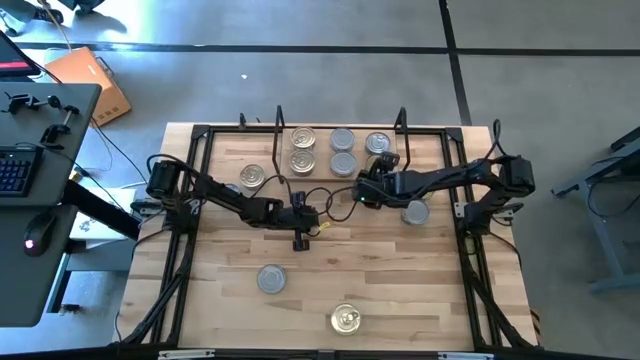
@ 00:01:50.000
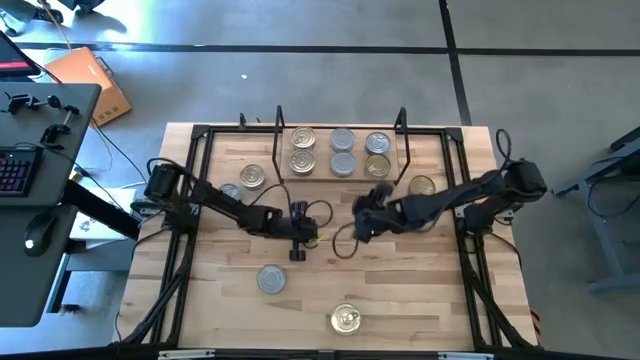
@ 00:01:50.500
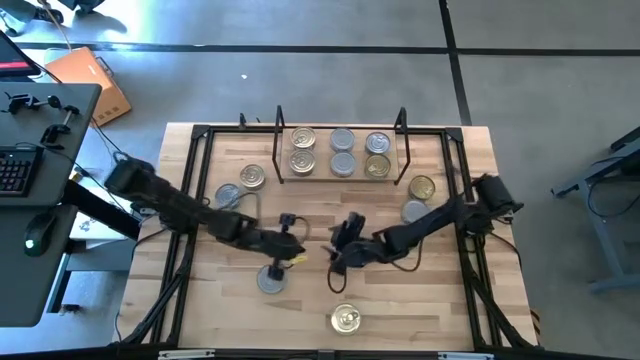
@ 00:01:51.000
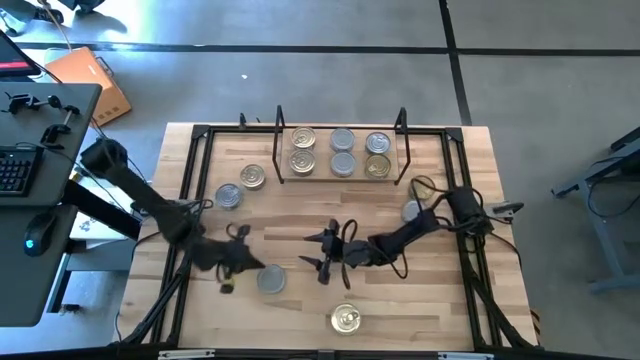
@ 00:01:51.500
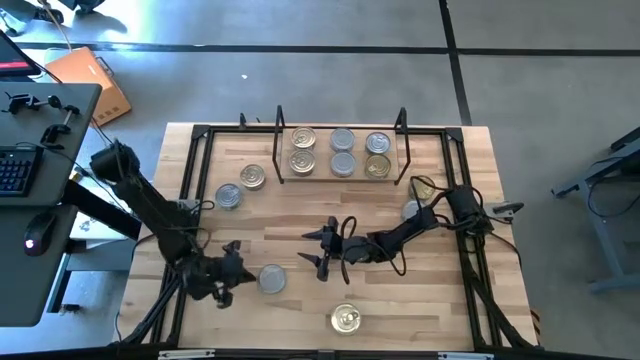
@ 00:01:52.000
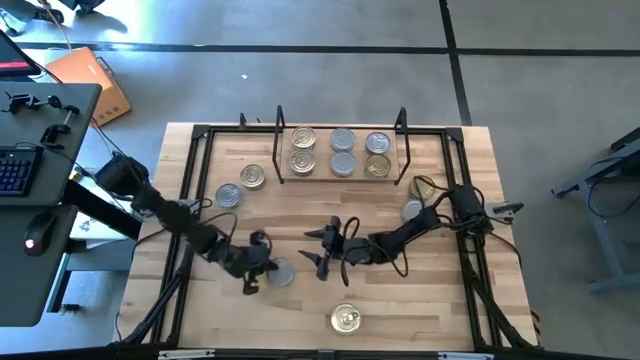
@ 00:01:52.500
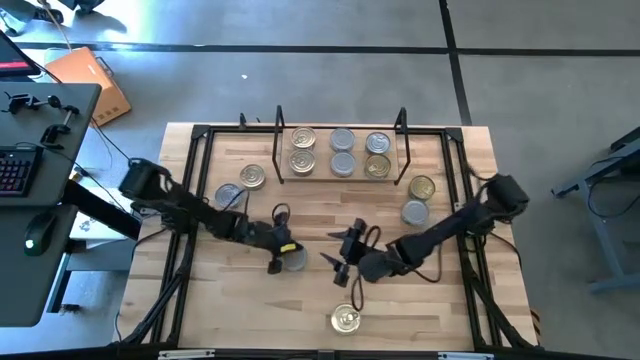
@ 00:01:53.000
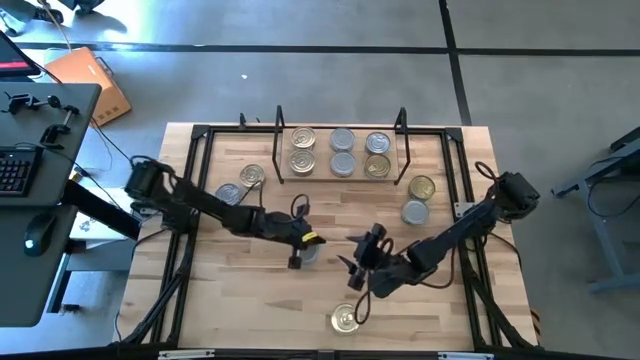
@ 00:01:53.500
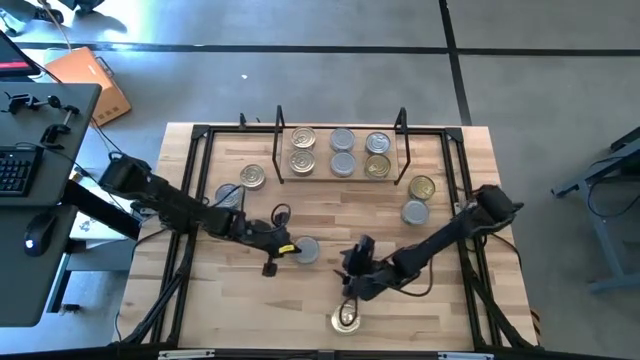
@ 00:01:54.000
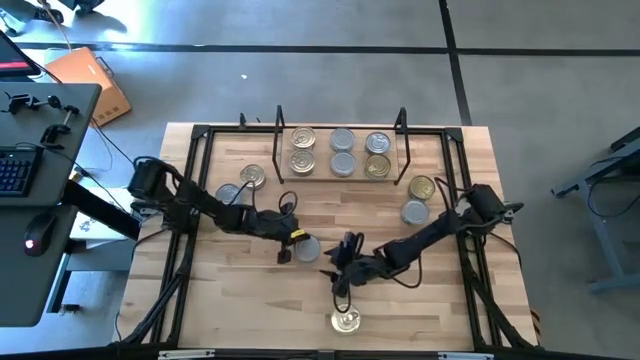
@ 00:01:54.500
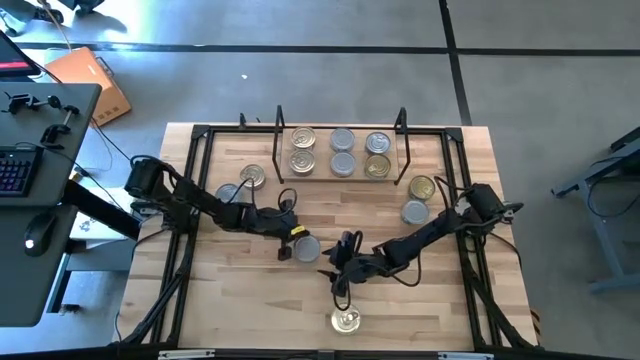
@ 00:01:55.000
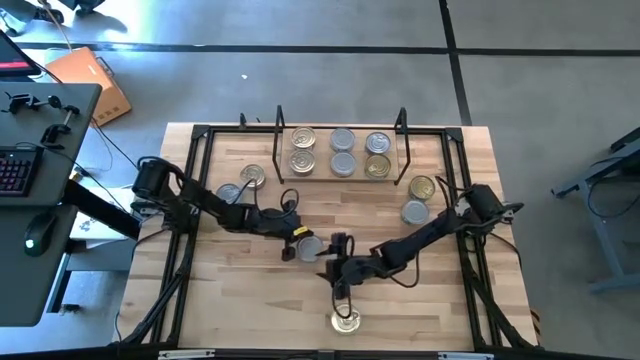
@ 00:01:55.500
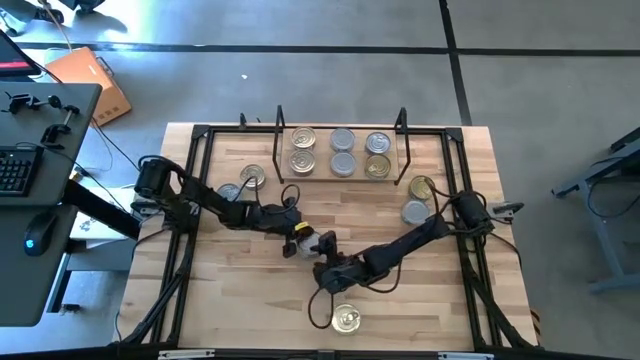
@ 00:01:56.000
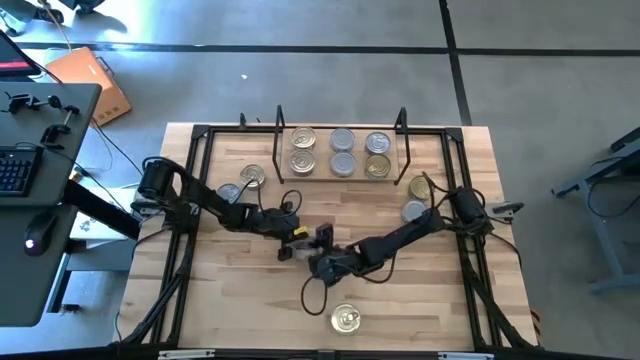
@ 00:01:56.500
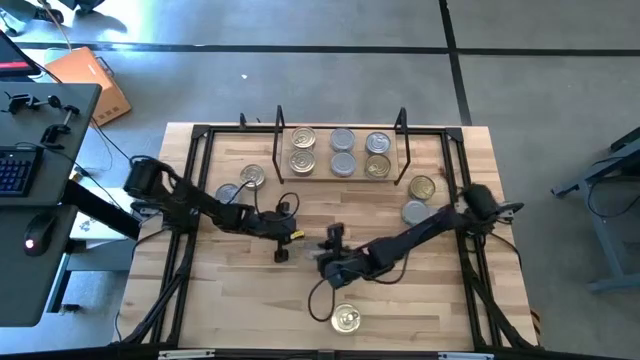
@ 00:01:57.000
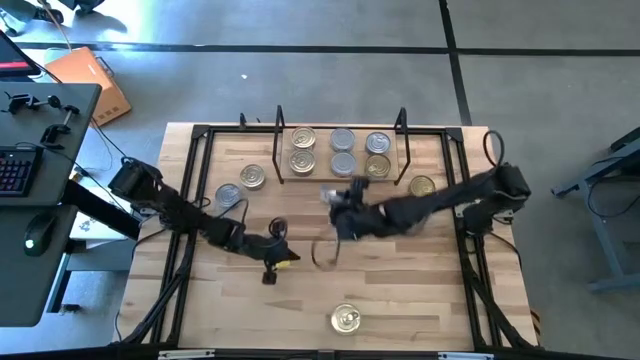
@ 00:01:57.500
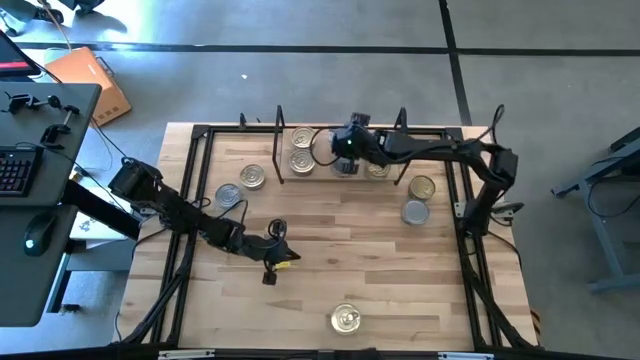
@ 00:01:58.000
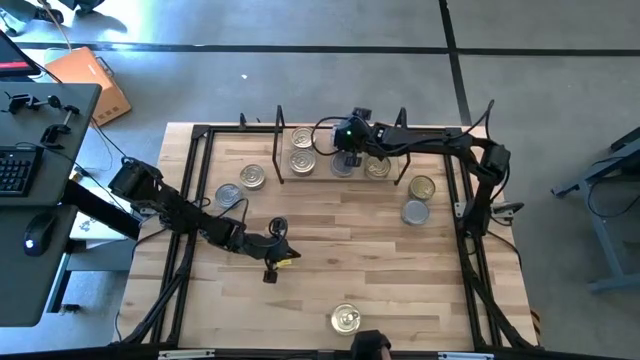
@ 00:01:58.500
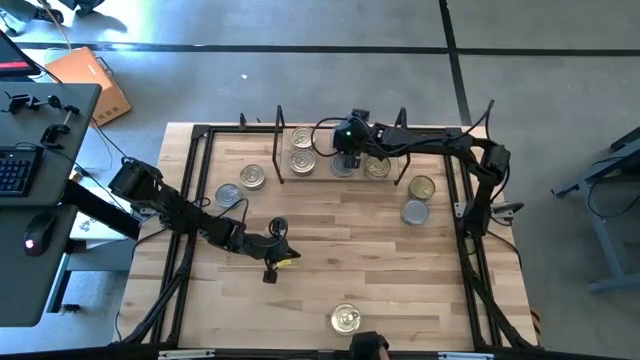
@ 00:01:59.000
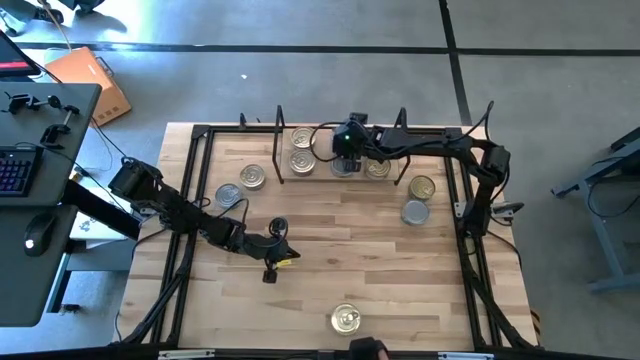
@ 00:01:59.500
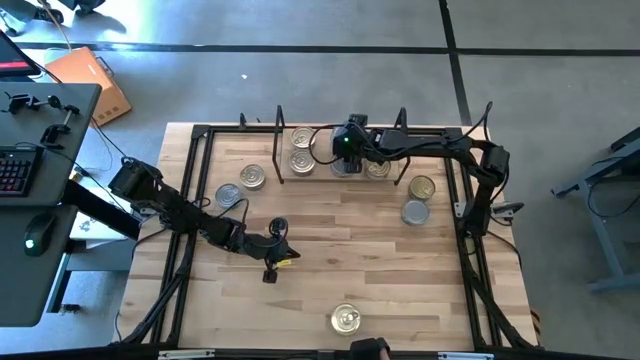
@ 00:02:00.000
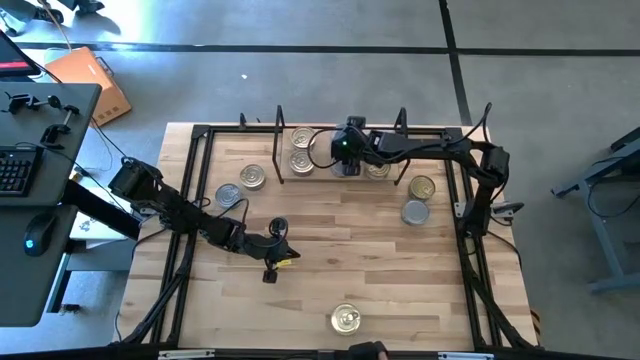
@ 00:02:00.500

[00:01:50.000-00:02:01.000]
Task: Stack canned seafood by type on shelf
Stack the green tuna can on top of the green tuna can on the shelf

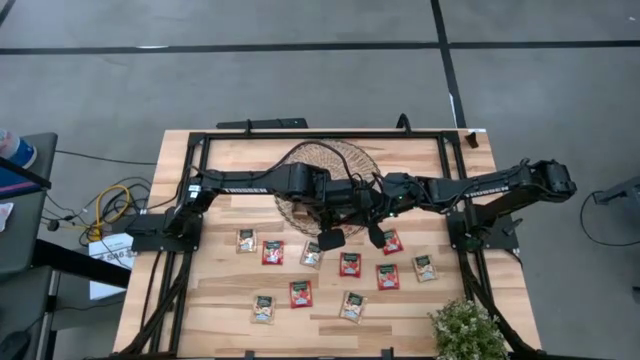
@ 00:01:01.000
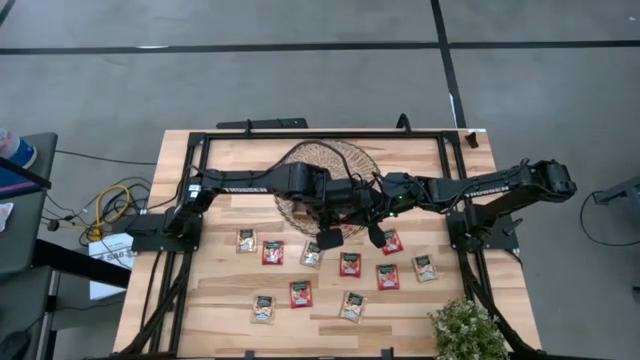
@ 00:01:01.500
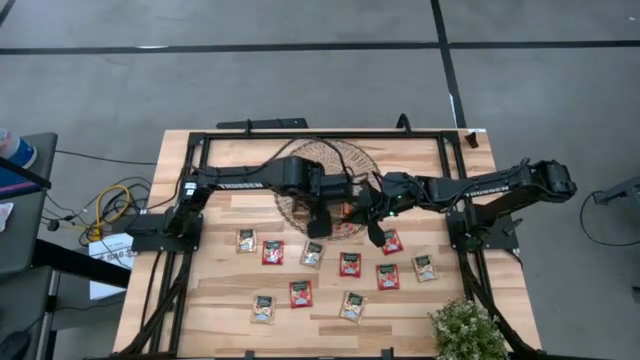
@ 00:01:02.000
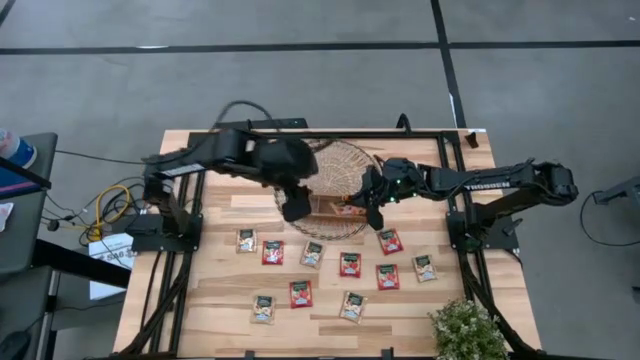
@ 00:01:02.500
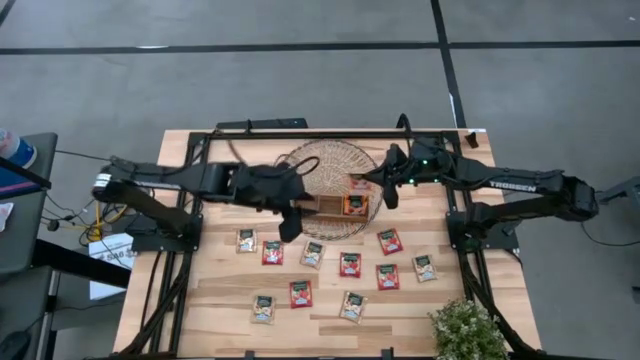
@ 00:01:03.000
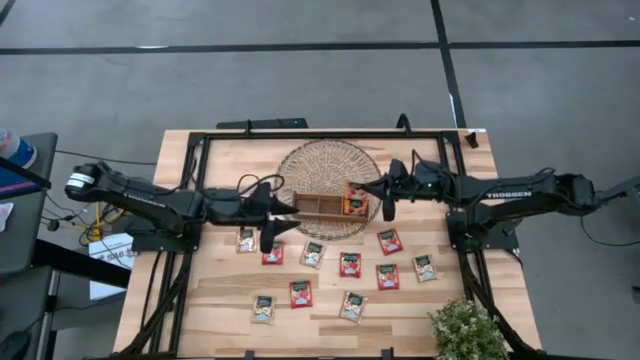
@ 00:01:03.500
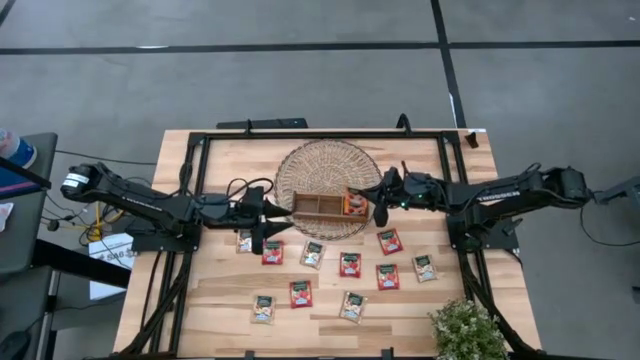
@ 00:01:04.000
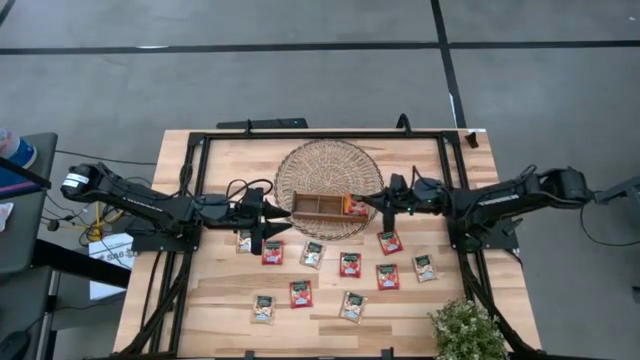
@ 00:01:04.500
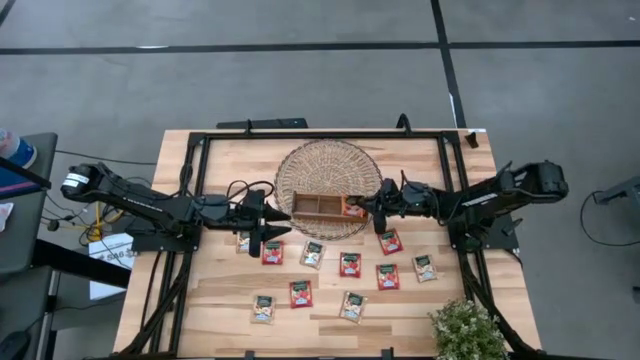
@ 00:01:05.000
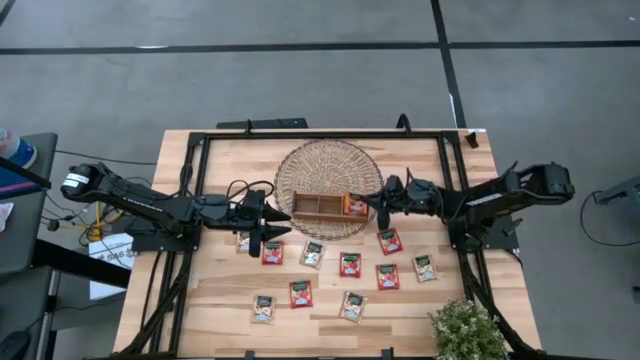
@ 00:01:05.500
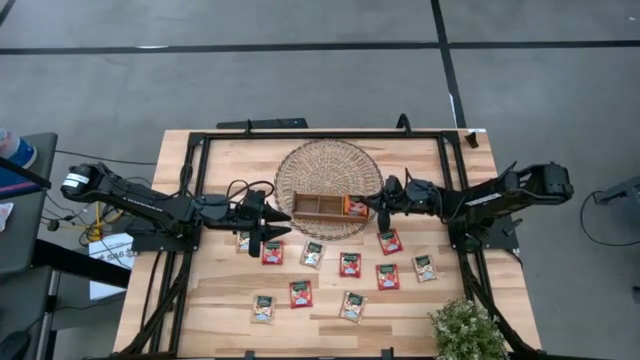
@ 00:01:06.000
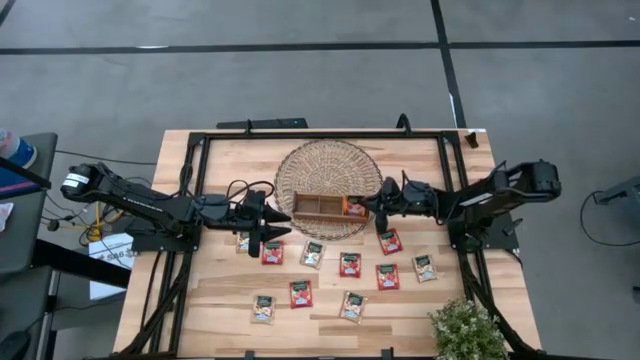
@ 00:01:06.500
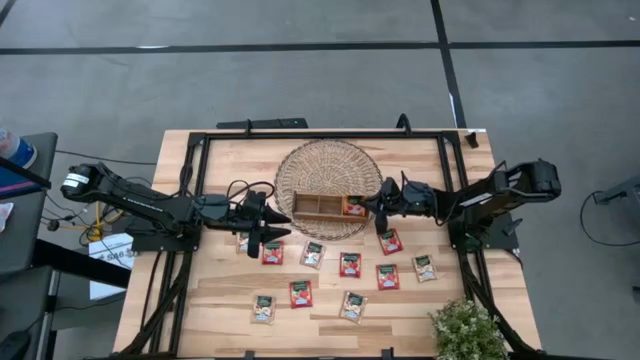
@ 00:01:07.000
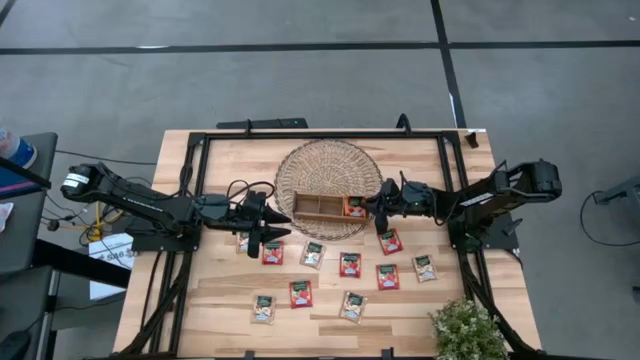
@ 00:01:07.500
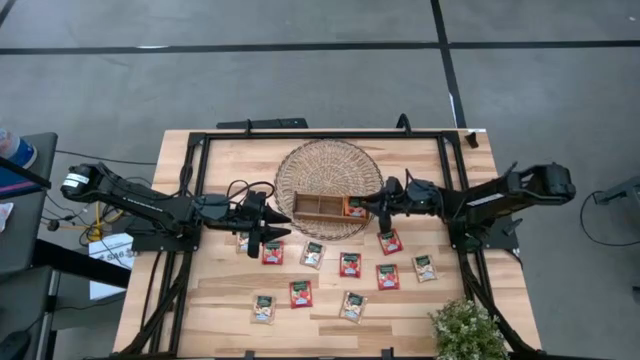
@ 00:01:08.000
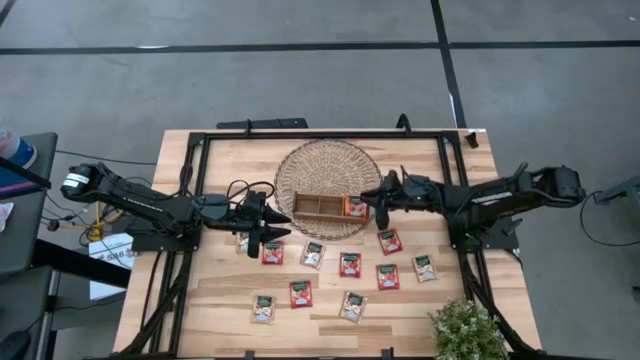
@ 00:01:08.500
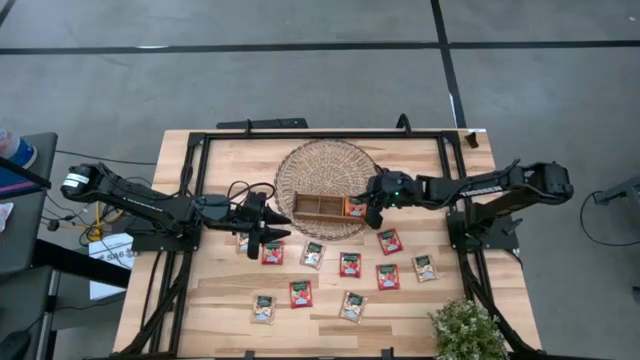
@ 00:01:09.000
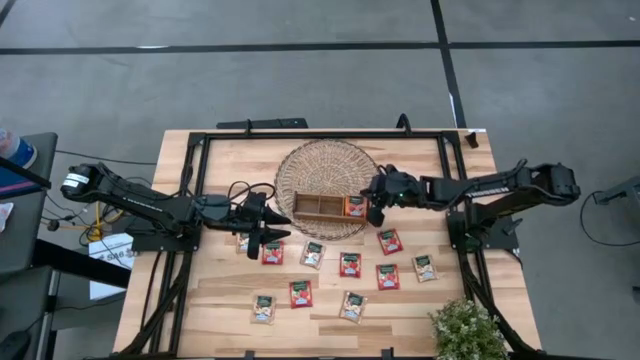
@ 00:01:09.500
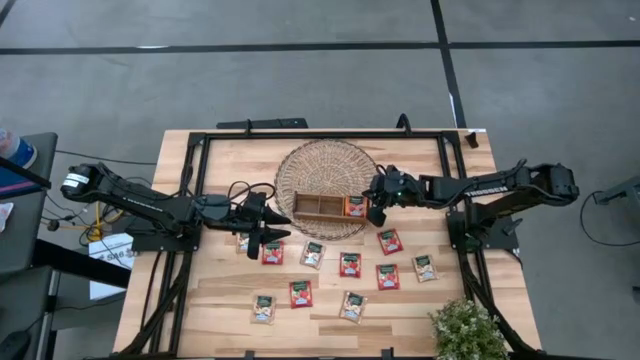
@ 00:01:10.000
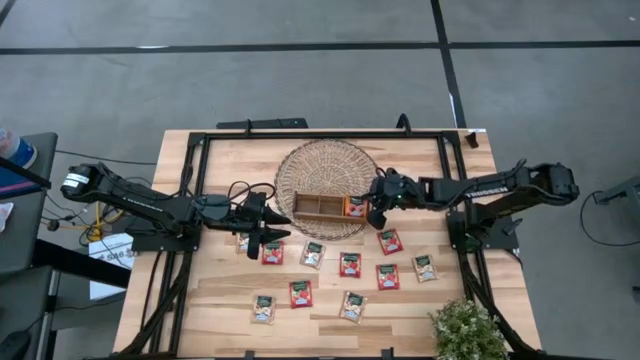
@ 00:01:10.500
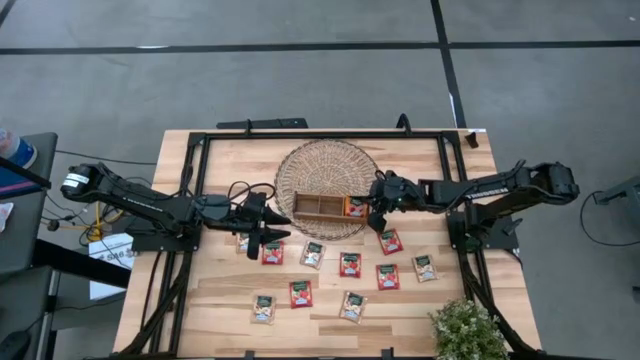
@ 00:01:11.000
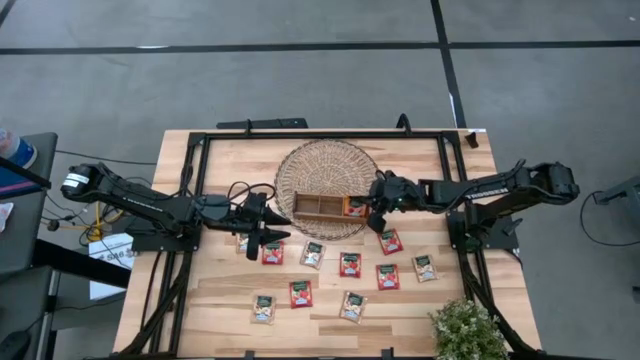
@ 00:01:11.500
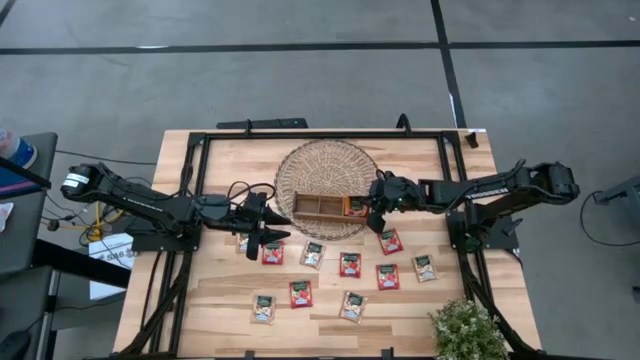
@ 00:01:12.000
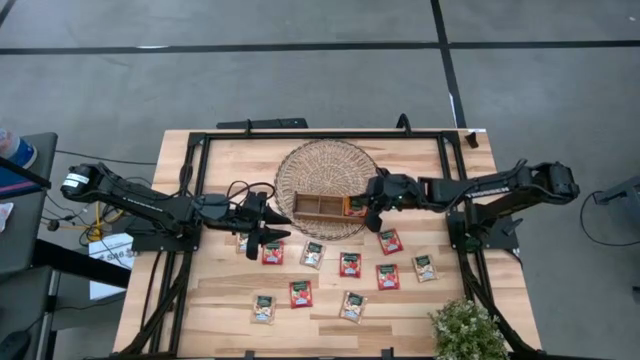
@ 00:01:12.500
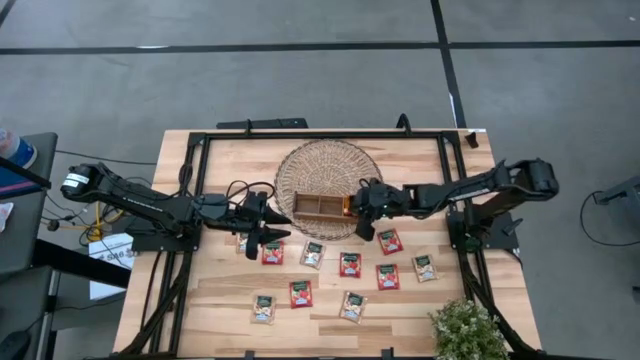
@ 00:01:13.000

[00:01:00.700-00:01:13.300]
Task: Pick & Place Tea
Put the orange tea bag into the right section of the wooden organizer
